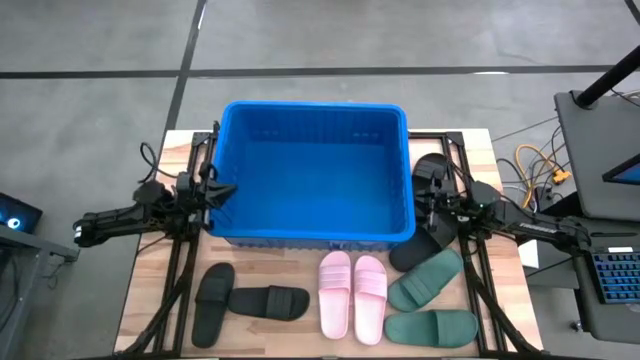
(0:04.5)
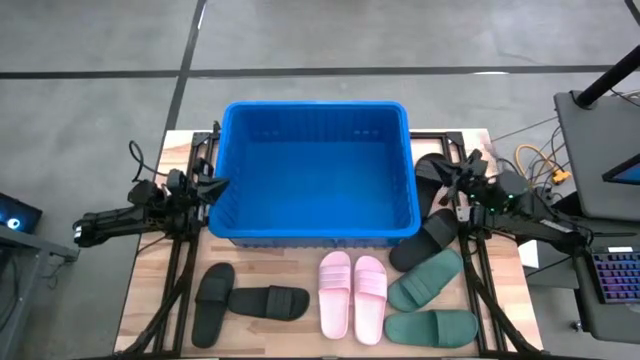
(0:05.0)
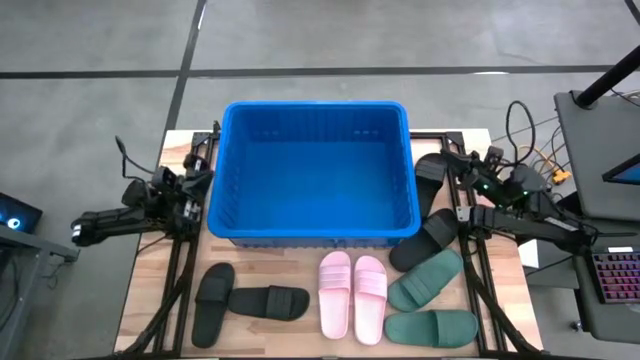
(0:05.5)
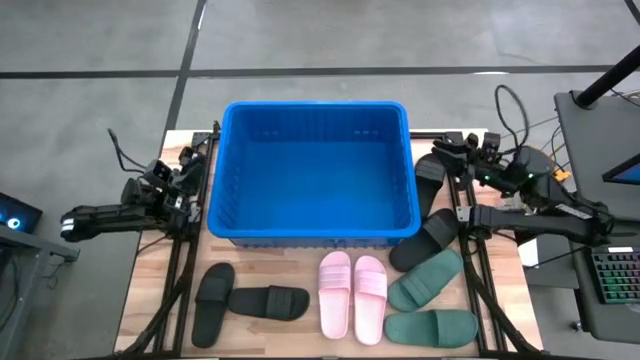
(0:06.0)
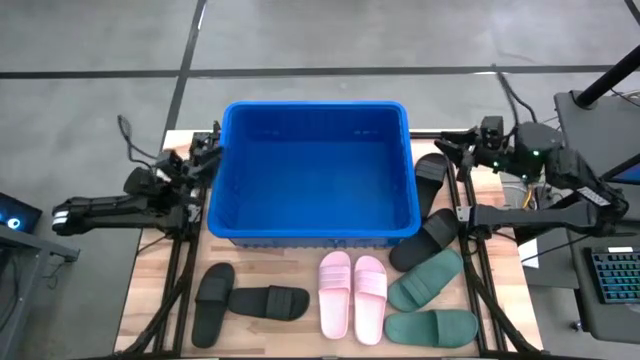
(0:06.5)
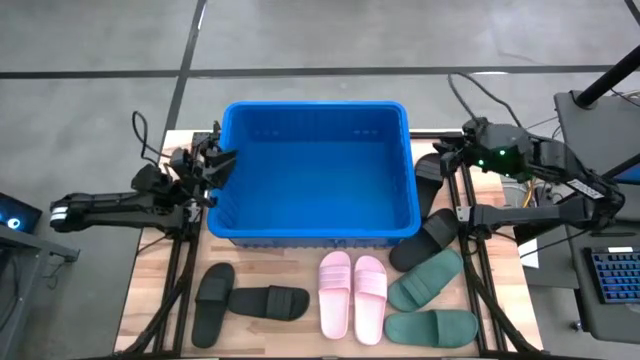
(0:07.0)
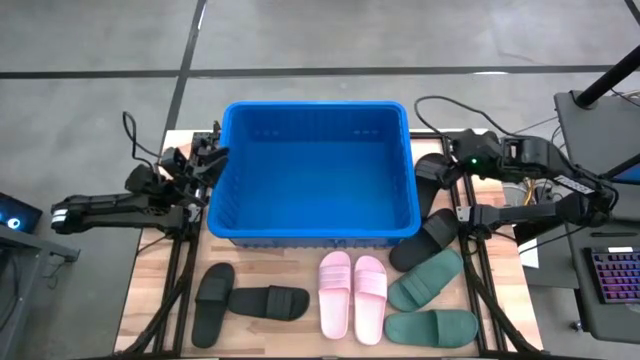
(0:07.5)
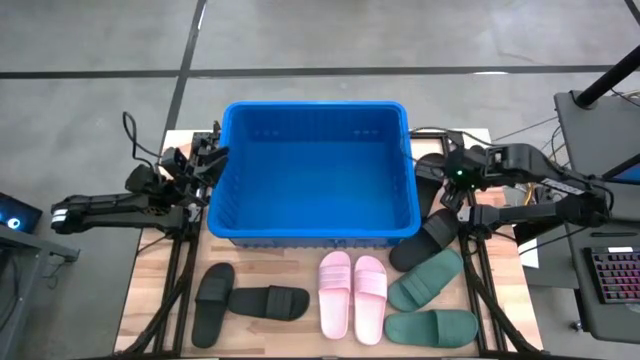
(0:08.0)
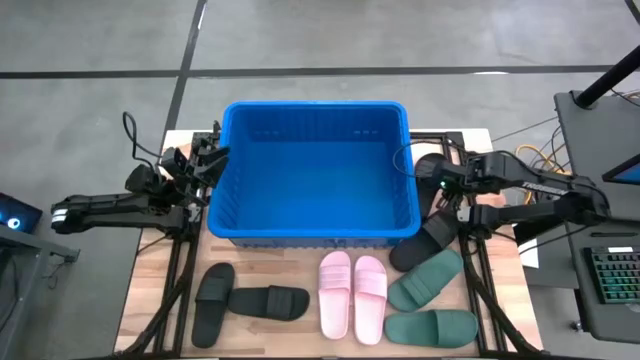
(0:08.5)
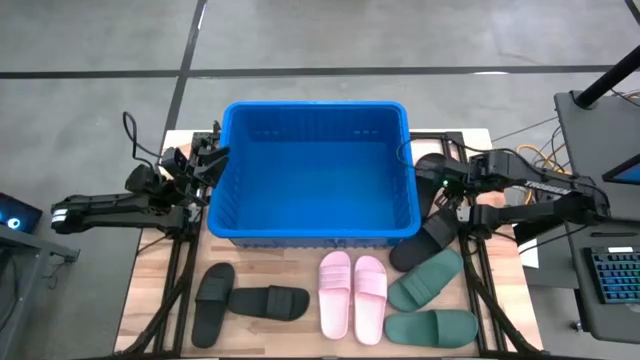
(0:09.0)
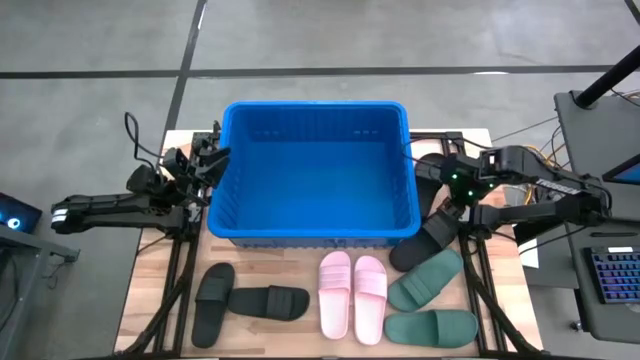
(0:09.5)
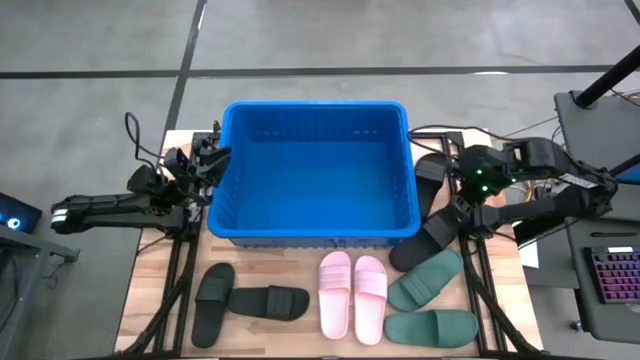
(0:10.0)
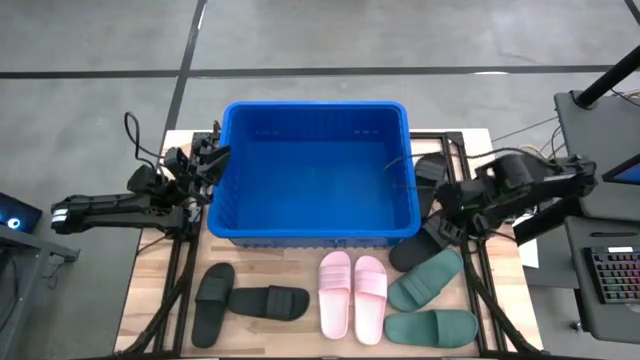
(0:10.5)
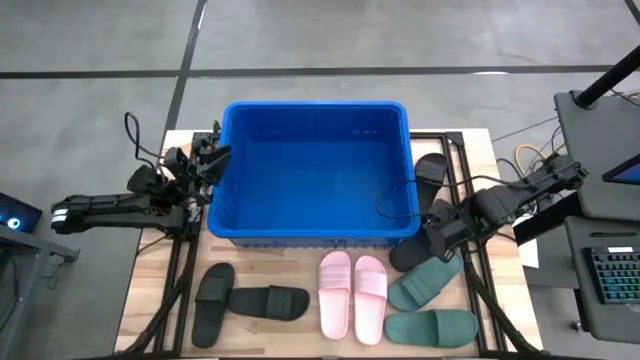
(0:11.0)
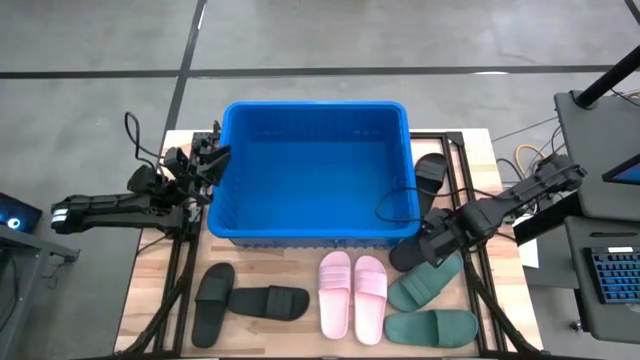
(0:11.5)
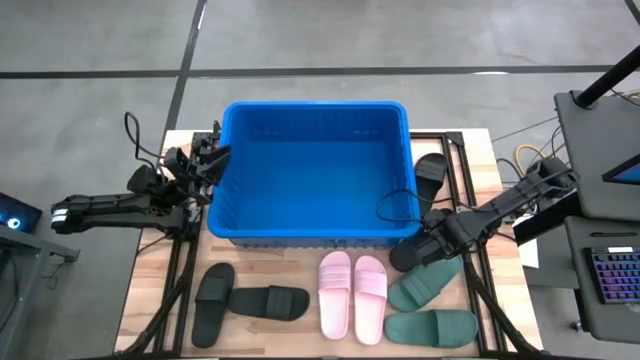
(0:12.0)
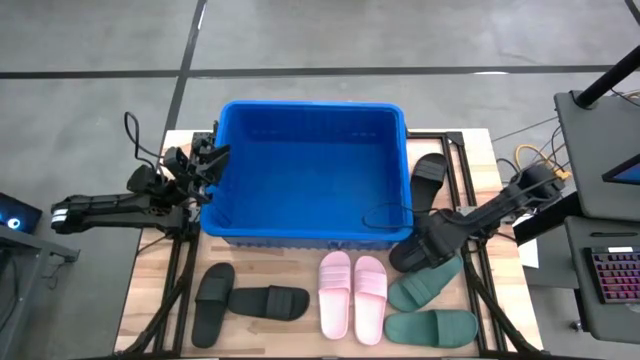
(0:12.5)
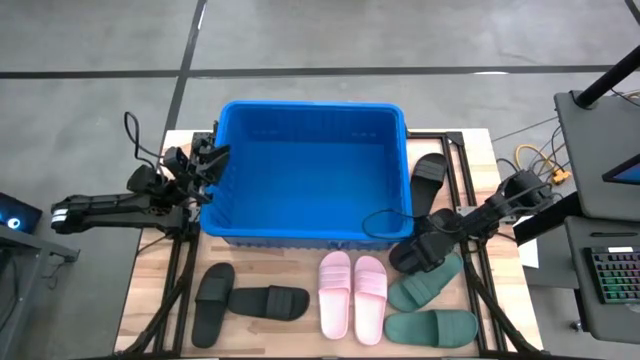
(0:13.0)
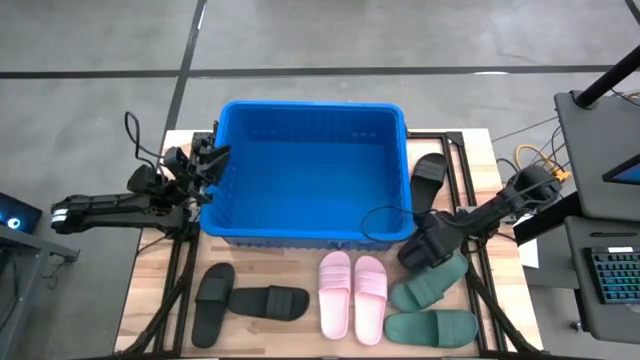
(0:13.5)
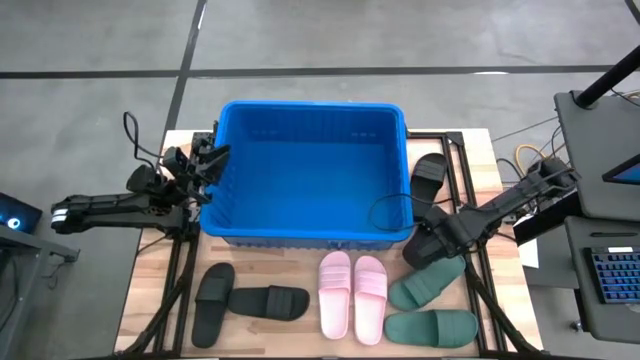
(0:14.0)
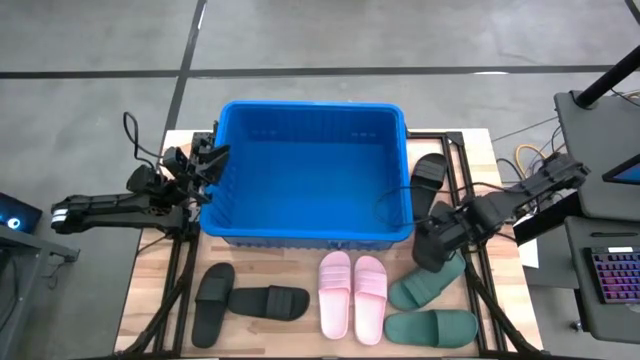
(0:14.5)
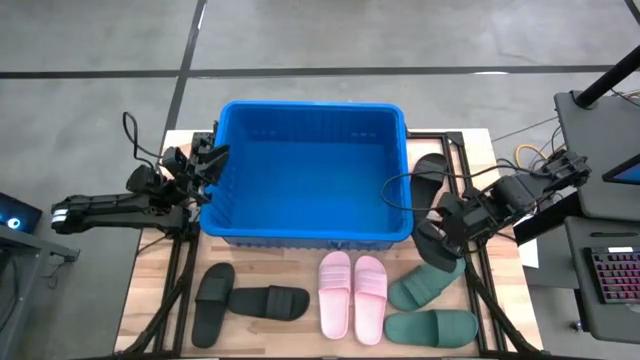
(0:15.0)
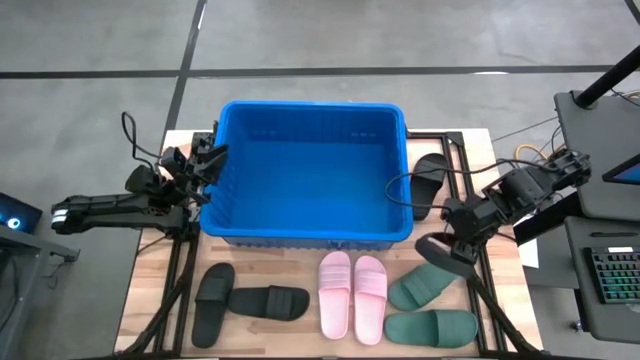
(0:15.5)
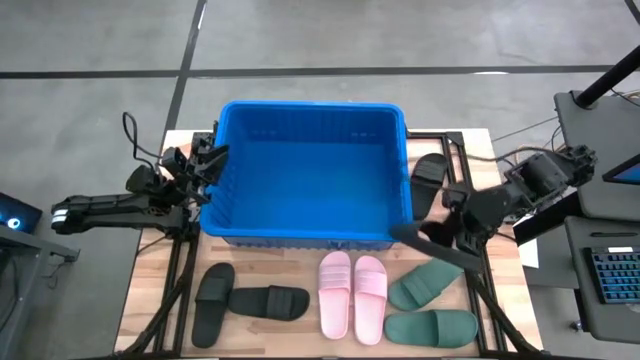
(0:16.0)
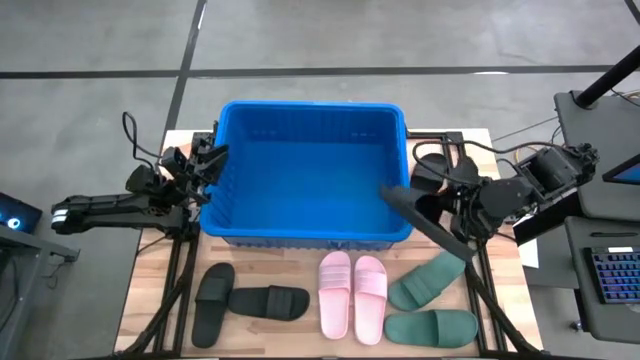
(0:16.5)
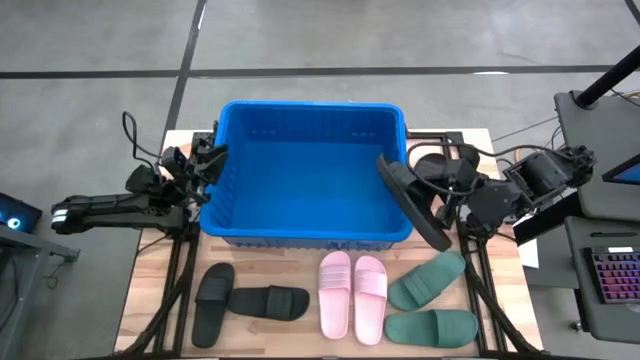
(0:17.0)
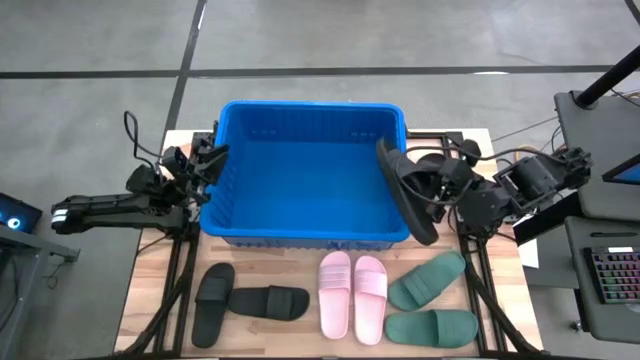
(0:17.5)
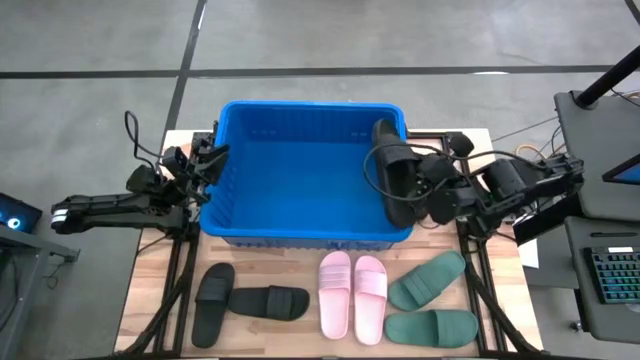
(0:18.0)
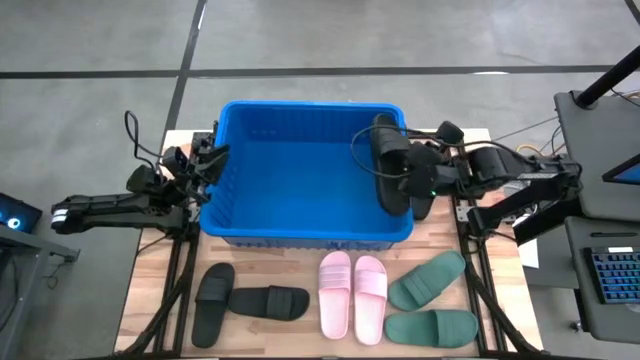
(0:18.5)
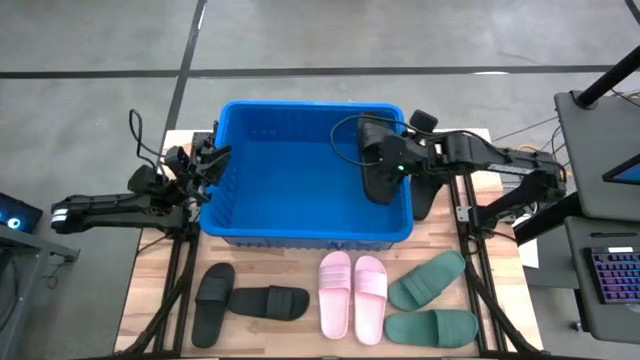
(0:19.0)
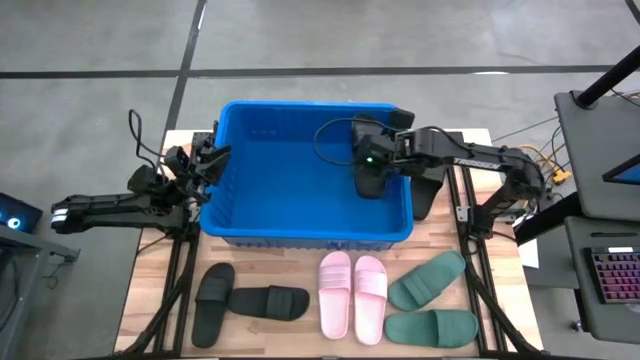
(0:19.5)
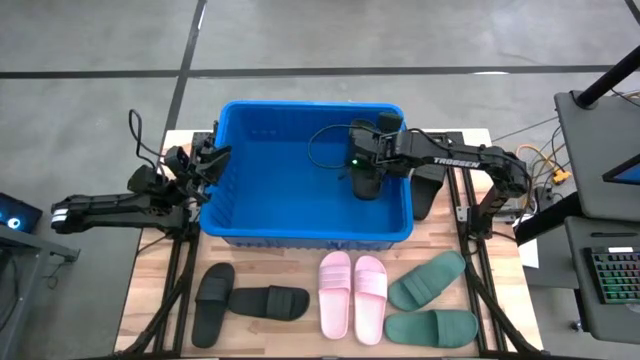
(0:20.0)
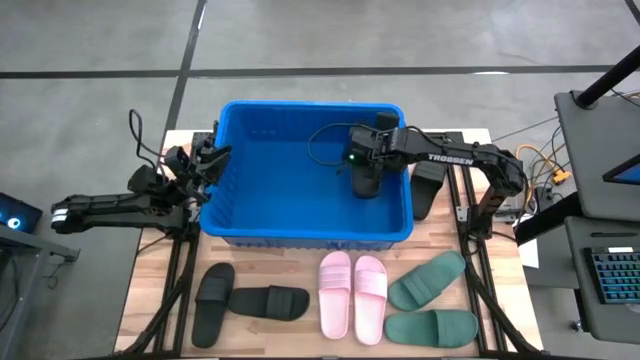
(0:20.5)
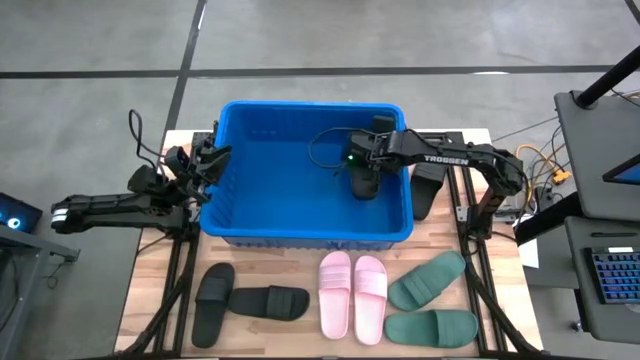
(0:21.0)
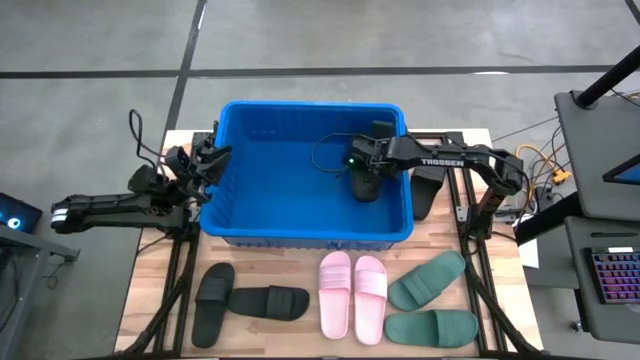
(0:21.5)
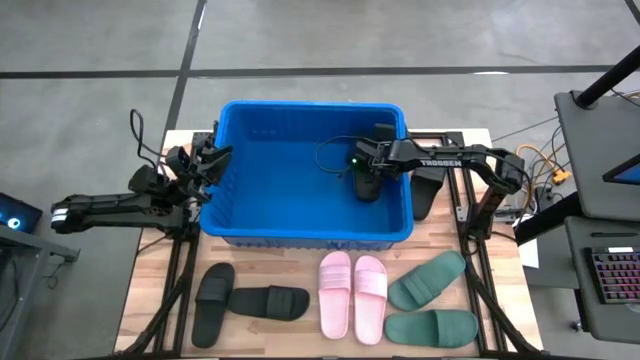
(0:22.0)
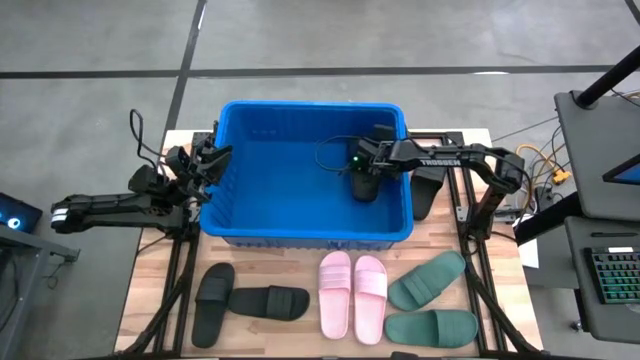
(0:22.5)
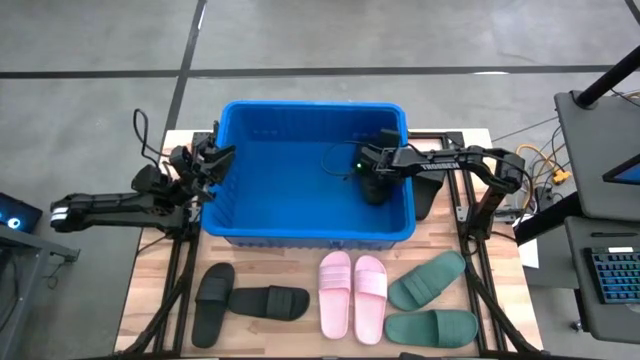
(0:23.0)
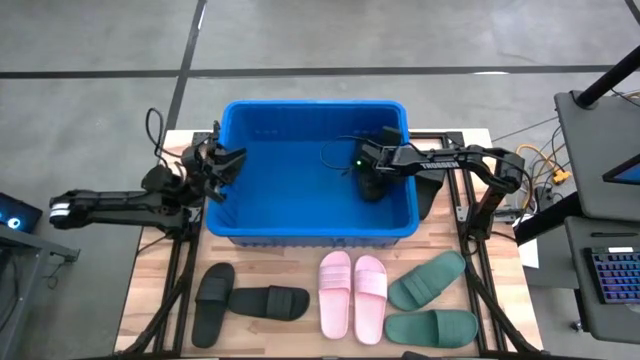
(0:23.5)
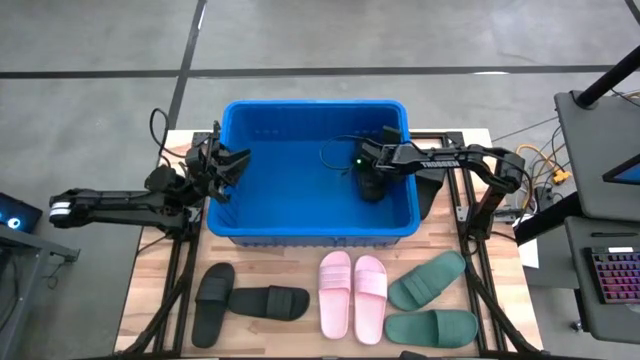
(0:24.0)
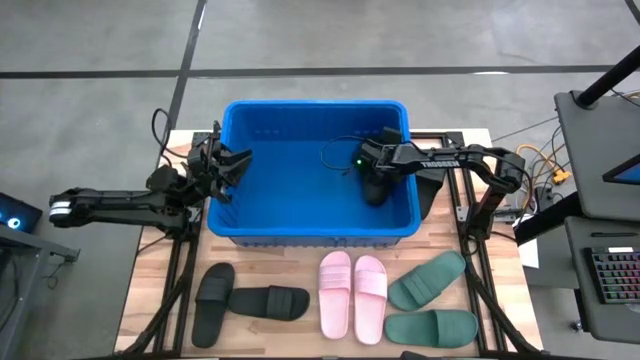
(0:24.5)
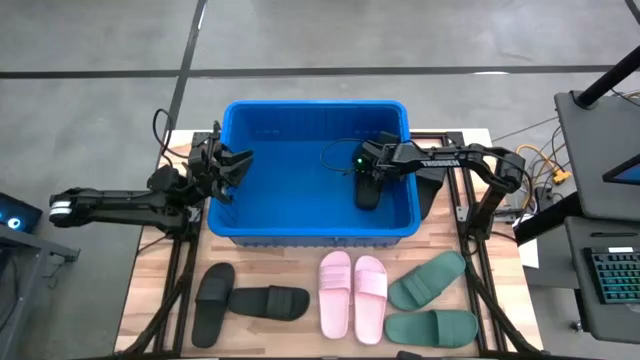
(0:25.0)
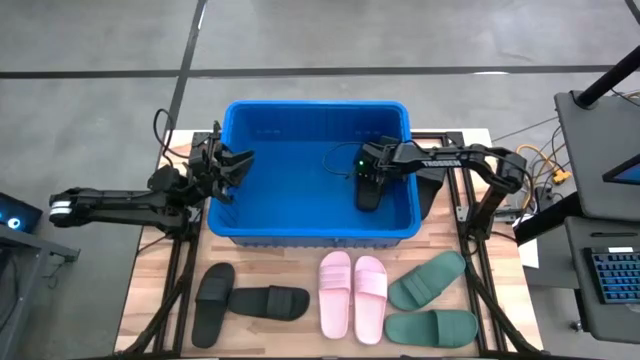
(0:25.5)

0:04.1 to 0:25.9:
Task: Pick and place slides into bin
Put the black slide into the blue bin
